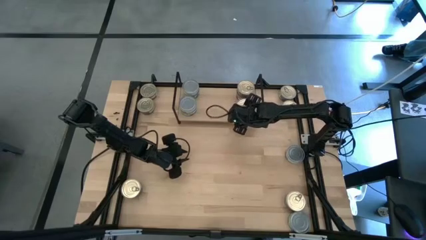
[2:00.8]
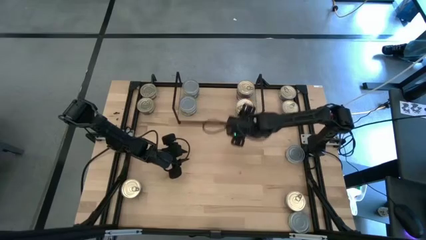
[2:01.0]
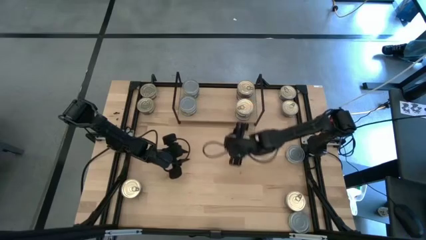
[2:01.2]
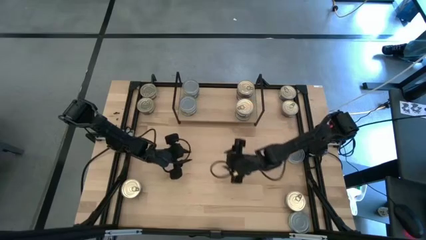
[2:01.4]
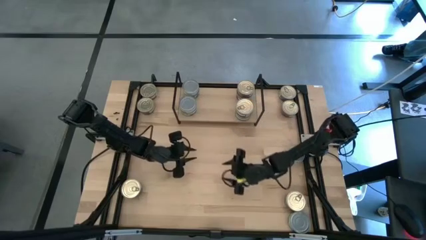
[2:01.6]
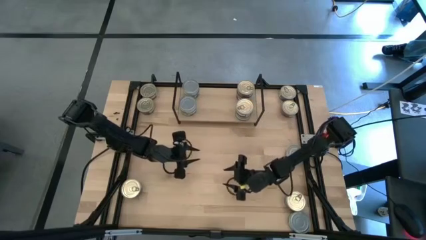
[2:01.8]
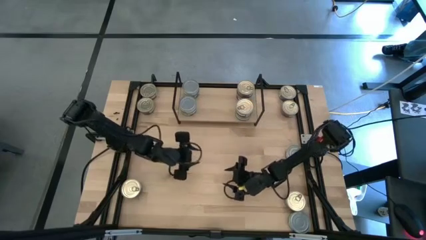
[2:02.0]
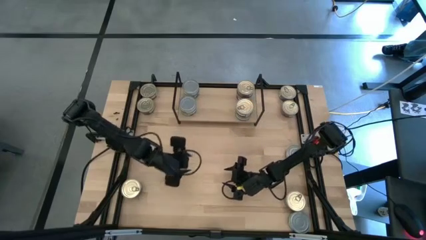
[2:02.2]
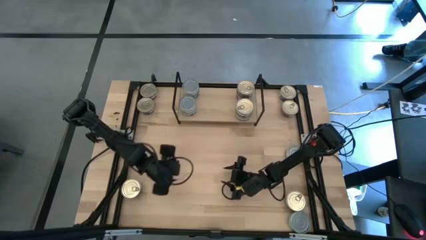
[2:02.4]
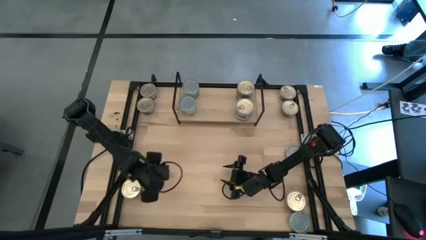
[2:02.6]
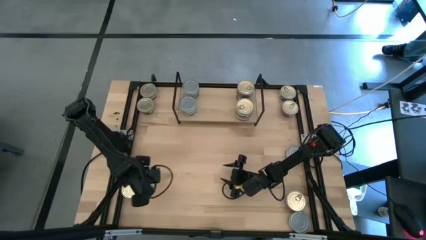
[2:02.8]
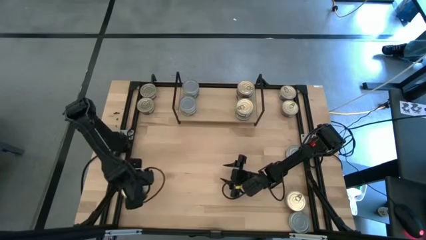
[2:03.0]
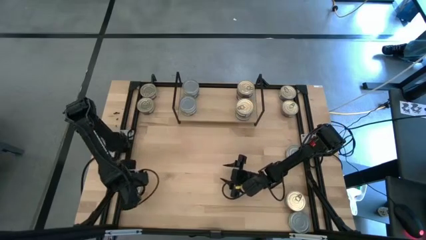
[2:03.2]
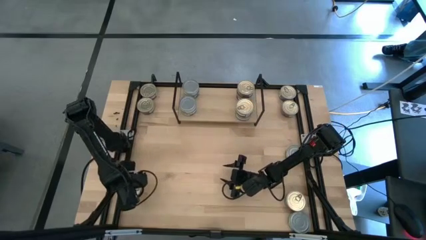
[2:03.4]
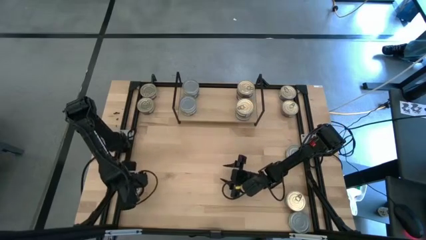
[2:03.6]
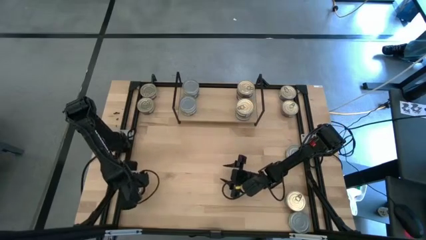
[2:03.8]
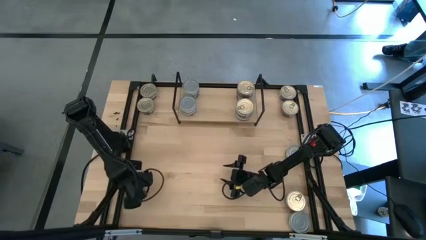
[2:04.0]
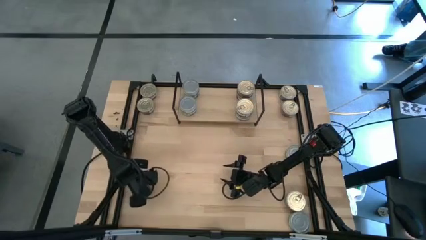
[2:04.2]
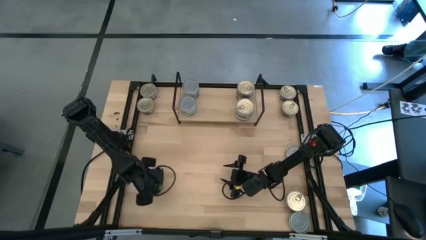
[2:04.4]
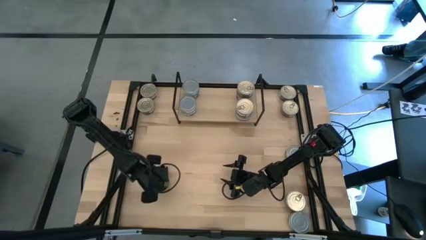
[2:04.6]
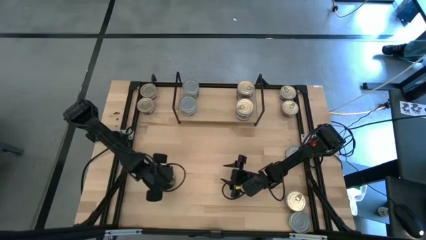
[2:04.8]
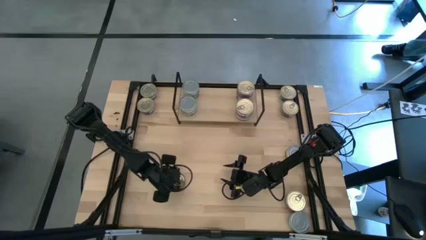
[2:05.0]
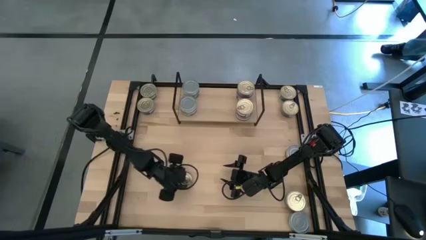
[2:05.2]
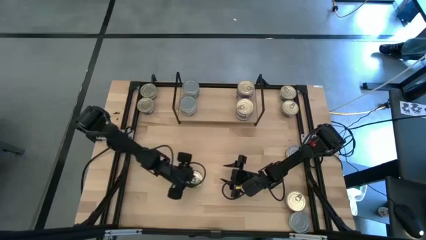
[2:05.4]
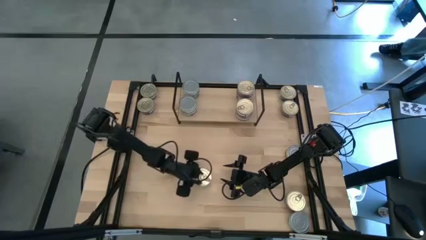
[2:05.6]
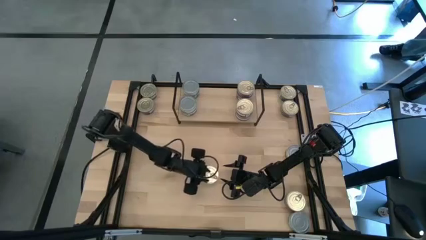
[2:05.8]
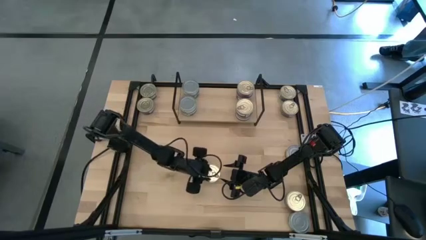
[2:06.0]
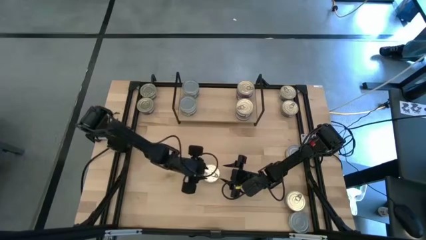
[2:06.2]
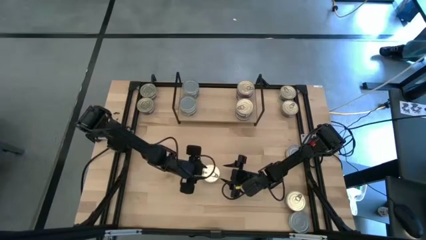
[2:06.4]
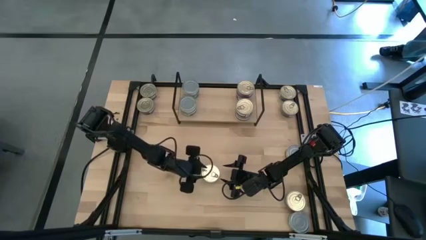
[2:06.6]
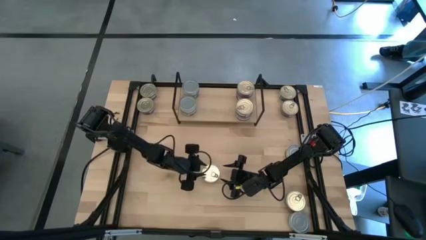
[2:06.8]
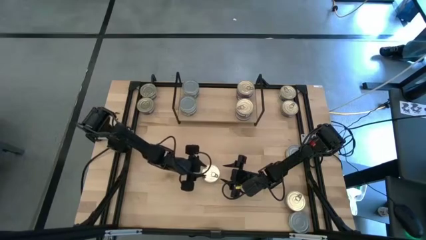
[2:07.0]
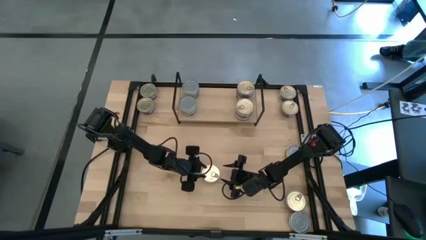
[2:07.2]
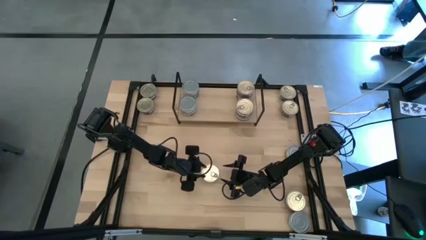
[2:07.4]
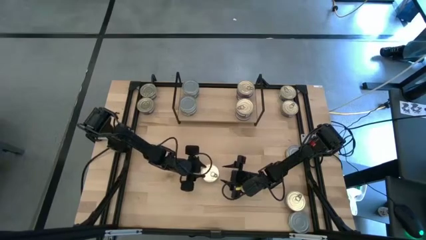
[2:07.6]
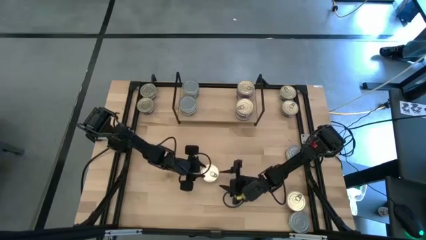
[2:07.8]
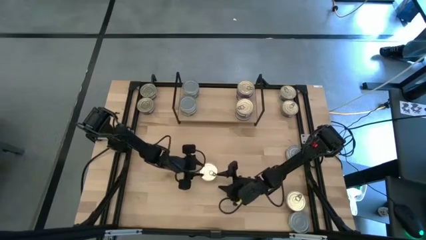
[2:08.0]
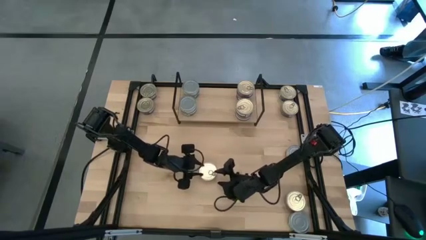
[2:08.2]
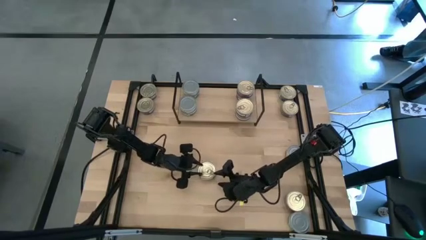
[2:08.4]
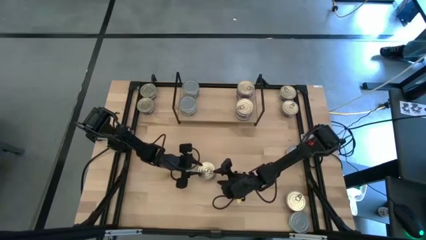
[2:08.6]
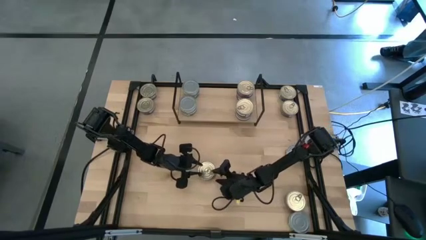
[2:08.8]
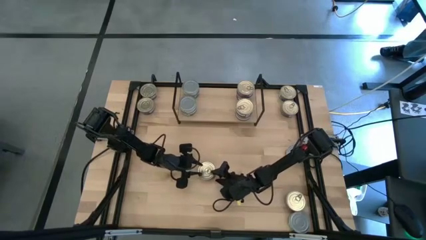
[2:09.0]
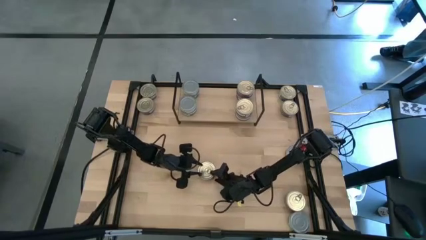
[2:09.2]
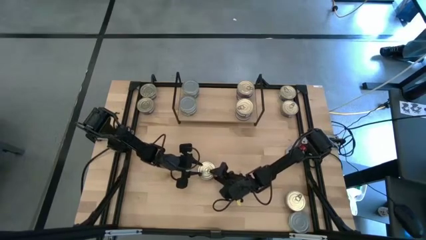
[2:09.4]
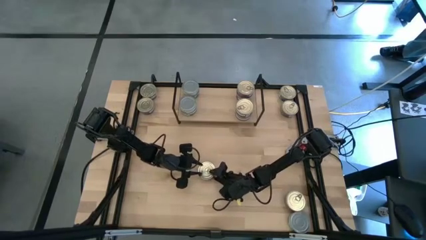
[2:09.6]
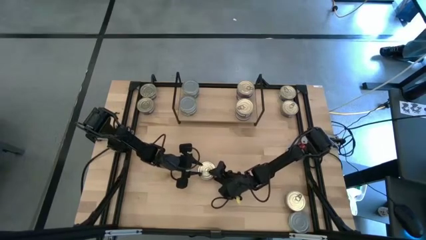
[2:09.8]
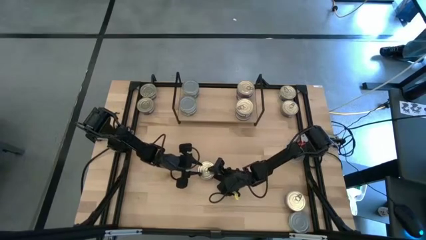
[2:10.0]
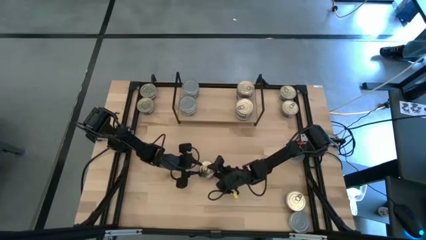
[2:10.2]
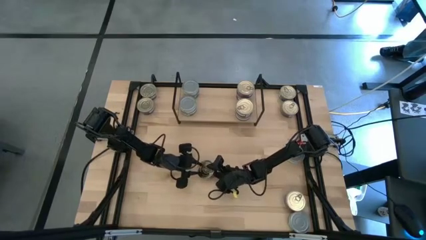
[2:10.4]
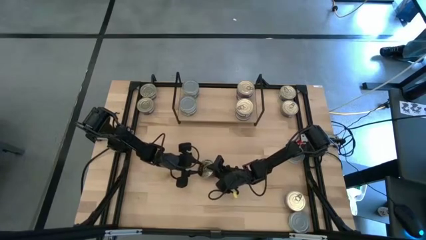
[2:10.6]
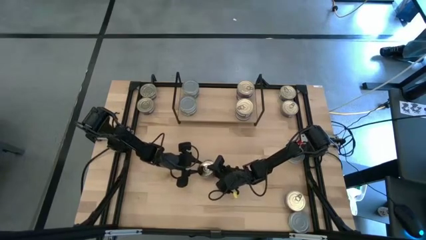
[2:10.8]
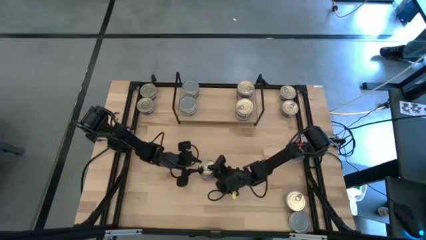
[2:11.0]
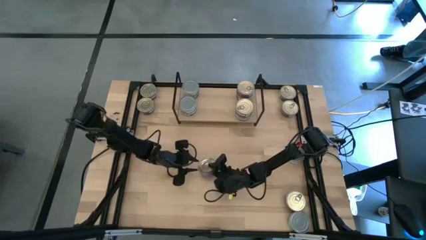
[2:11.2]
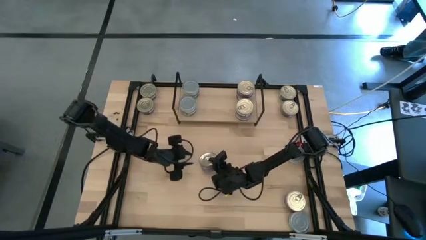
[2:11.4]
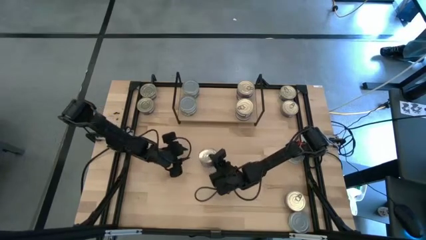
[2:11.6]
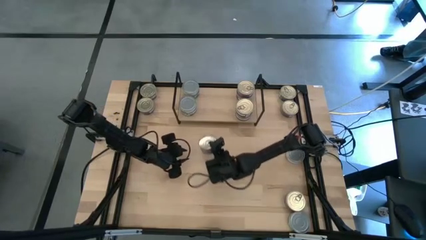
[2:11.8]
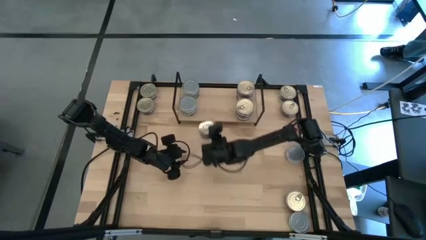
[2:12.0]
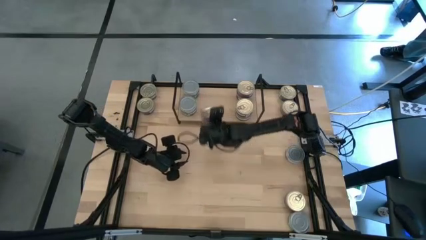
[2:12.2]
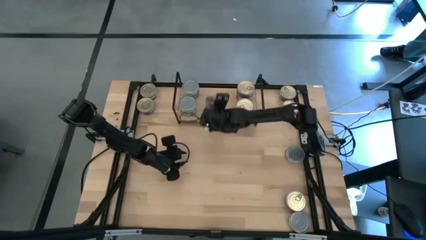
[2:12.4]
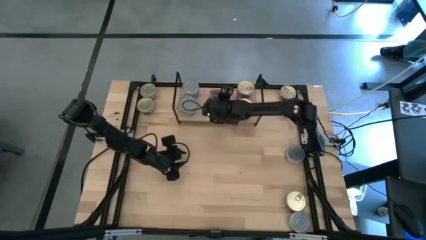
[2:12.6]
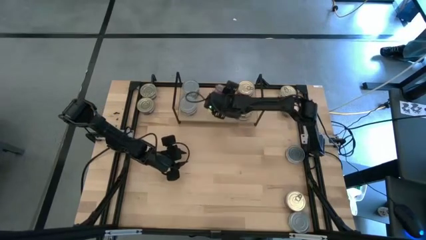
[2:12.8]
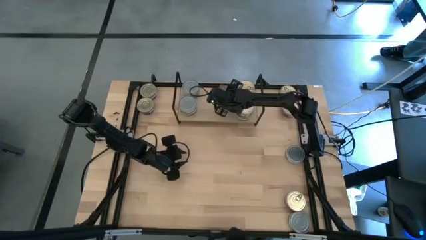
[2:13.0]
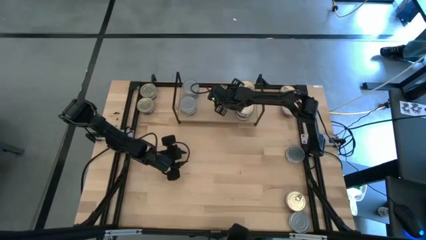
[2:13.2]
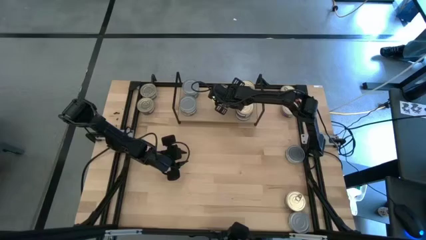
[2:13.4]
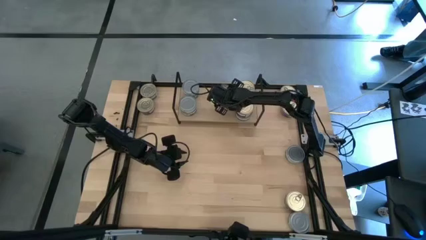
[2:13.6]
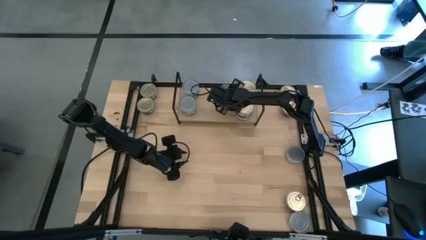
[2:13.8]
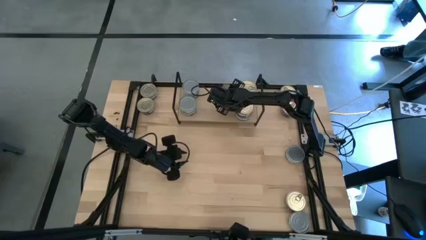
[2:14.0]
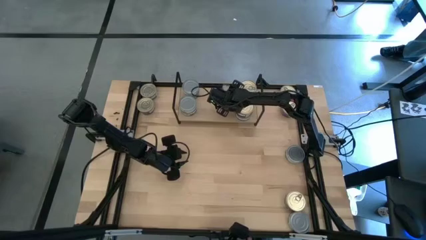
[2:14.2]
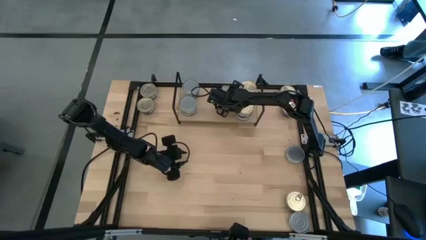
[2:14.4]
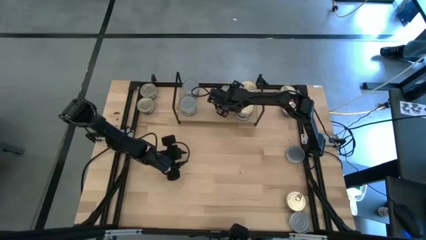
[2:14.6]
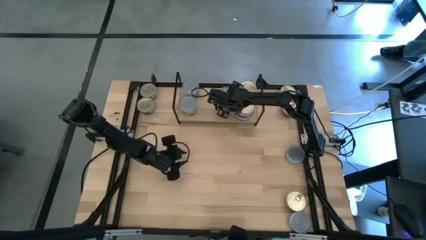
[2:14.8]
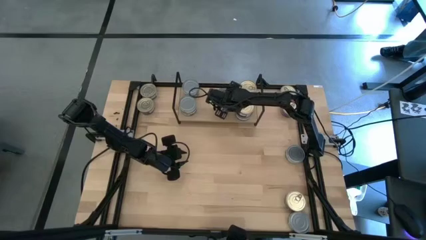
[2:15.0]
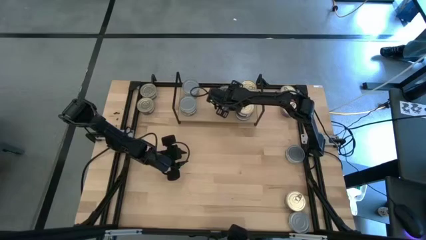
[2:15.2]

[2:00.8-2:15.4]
Task: Stack canned seafood by type on shelf
Put the blue pink tuna can on the shelf

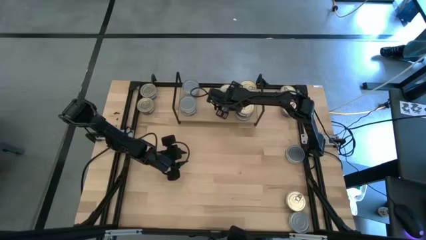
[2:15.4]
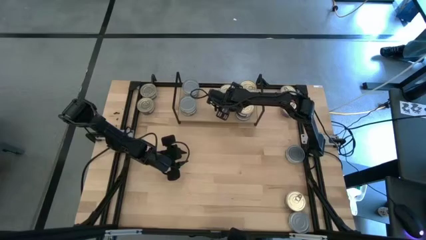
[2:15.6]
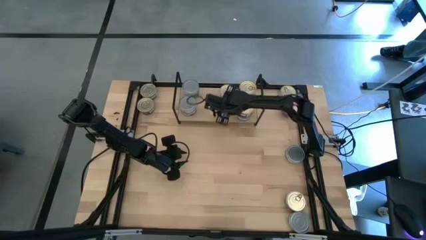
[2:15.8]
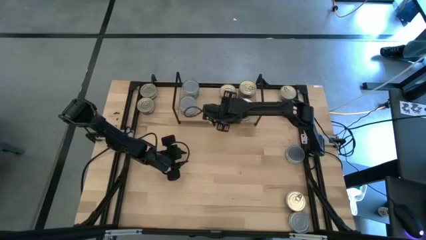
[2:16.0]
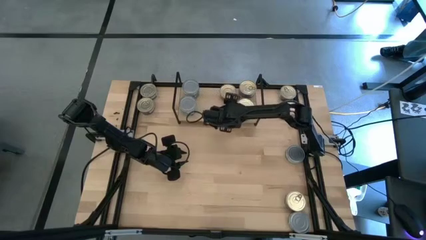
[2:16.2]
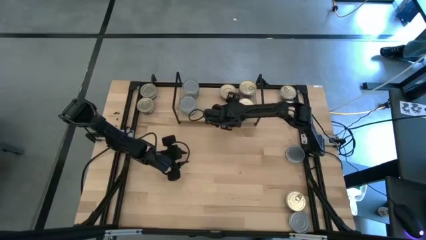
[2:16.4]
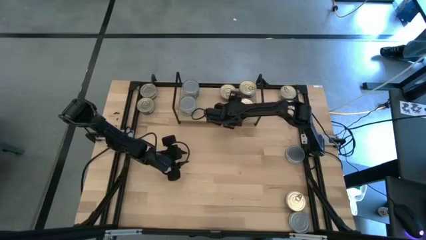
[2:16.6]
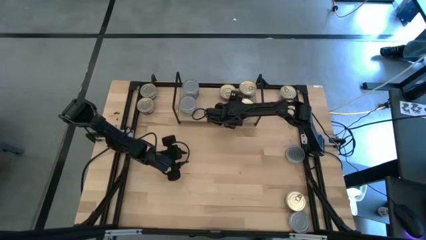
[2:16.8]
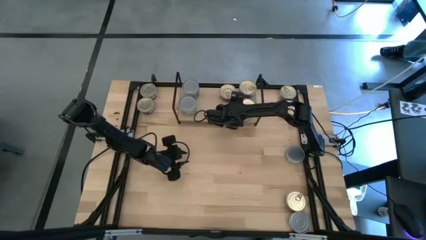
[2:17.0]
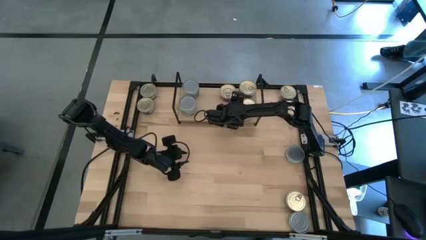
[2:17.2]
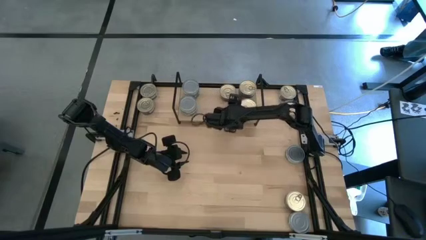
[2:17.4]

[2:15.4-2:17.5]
Adjust the bottom-right stacked blue pink tuna cans on the shelf

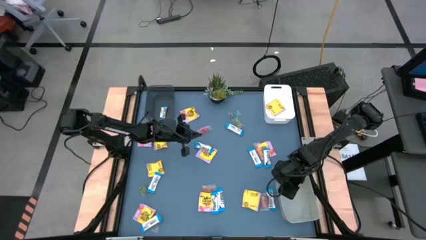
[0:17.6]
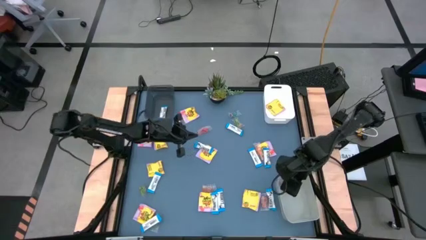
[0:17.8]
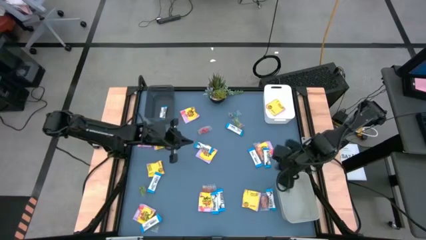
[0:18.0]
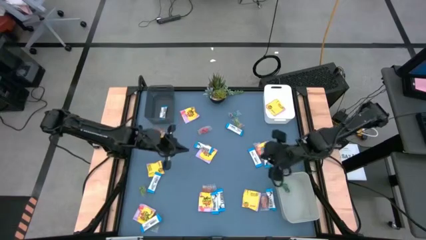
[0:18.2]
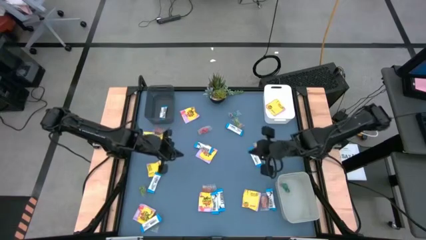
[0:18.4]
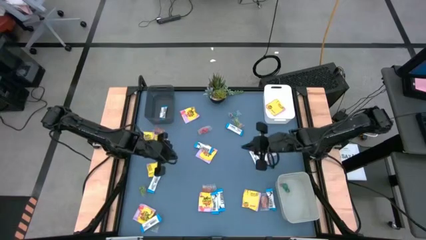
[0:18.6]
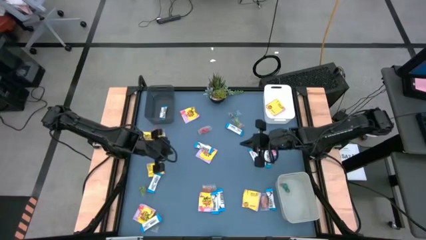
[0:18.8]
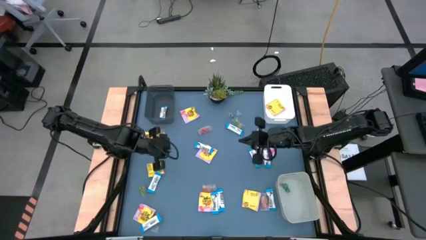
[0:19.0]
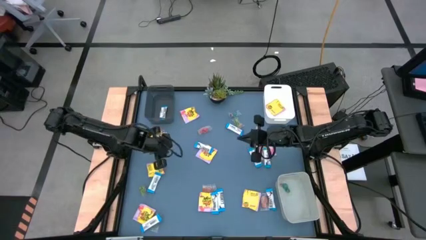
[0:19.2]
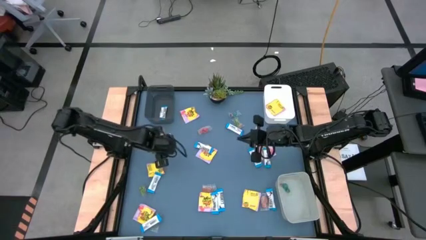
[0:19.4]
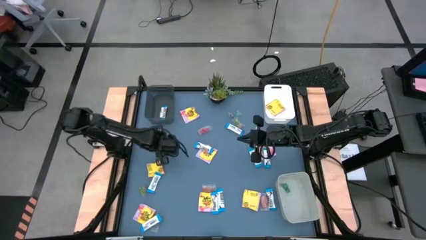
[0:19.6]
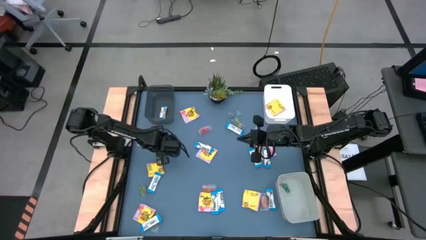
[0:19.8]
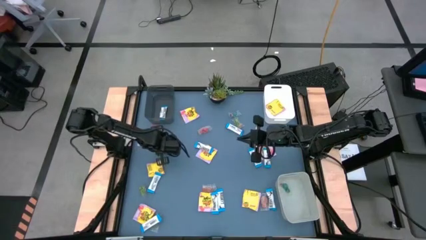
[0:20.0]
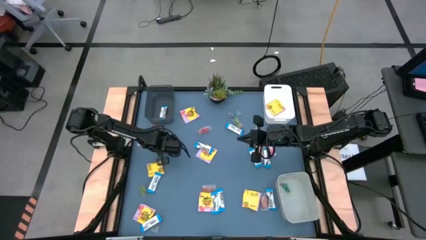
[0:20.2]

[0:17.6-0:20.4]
Task: Sort candy
Put the middle left yellow candy pack into the white bin
